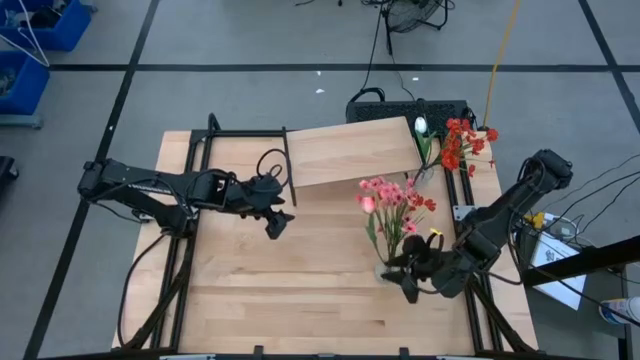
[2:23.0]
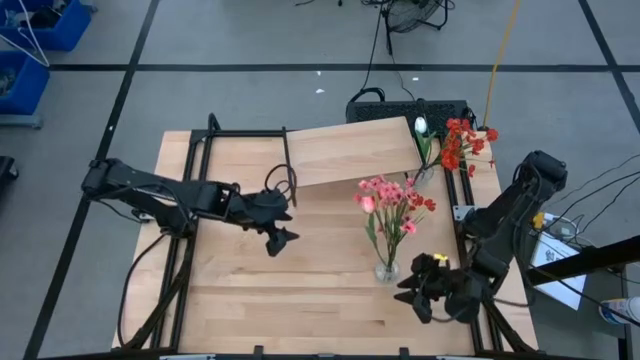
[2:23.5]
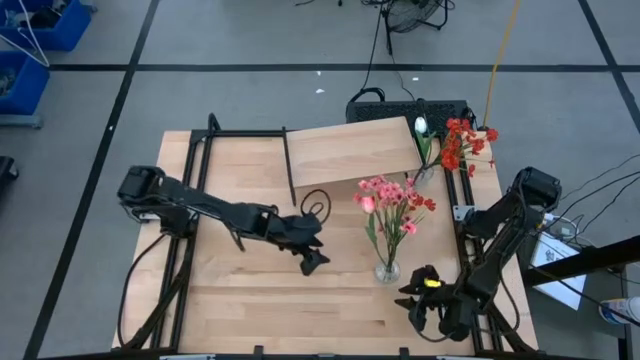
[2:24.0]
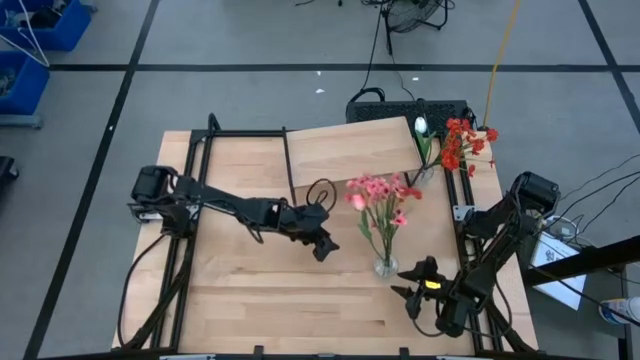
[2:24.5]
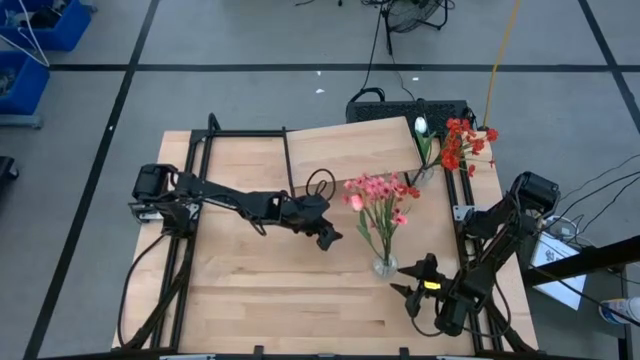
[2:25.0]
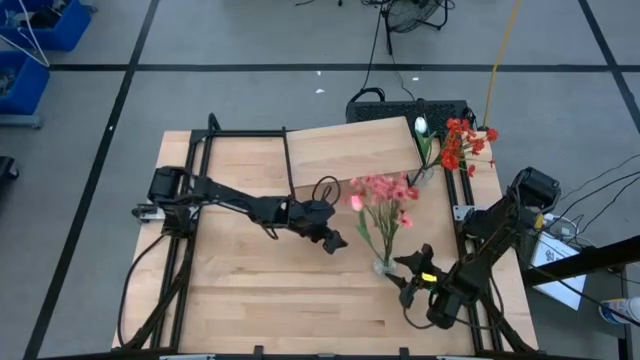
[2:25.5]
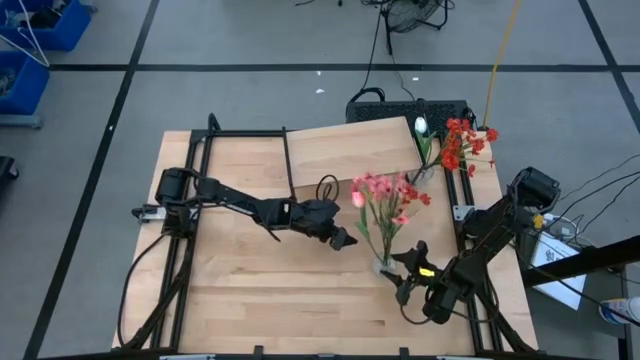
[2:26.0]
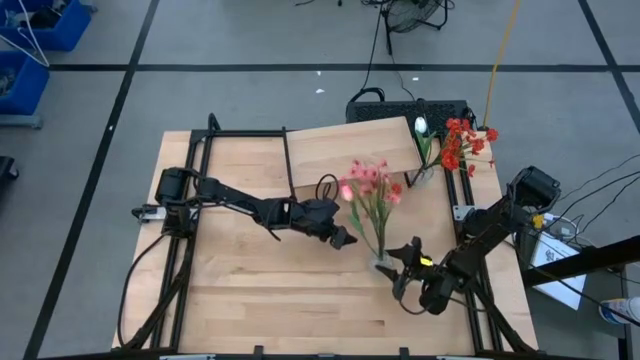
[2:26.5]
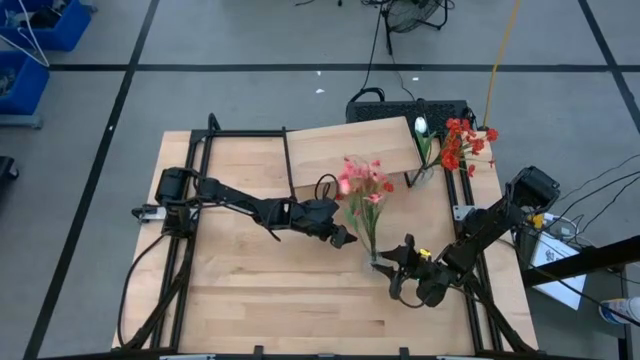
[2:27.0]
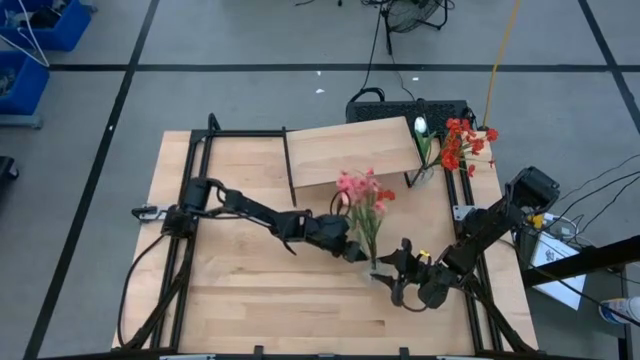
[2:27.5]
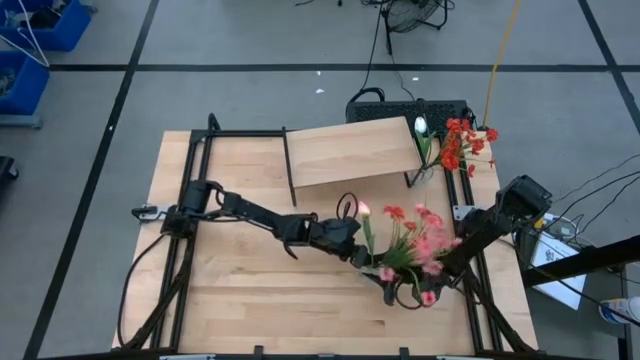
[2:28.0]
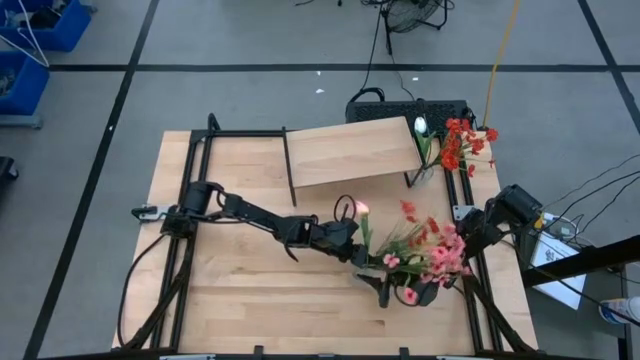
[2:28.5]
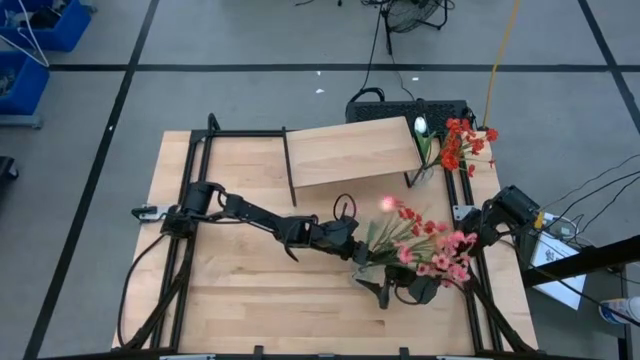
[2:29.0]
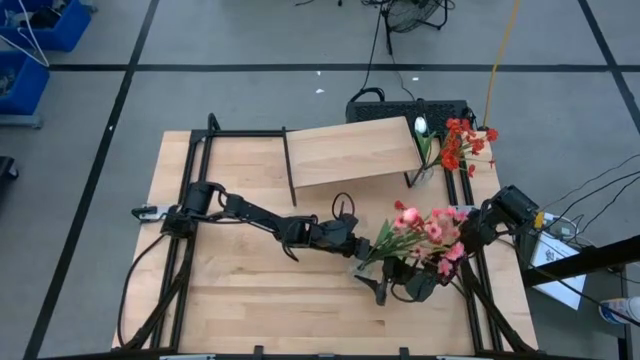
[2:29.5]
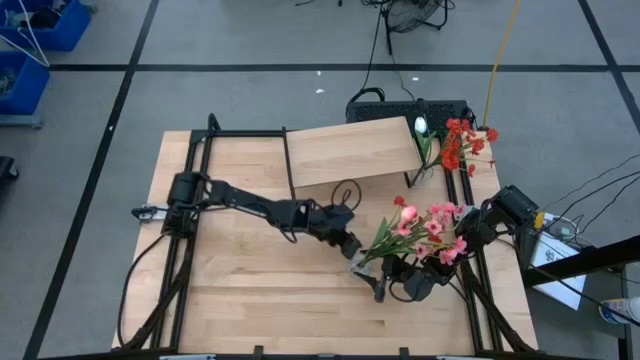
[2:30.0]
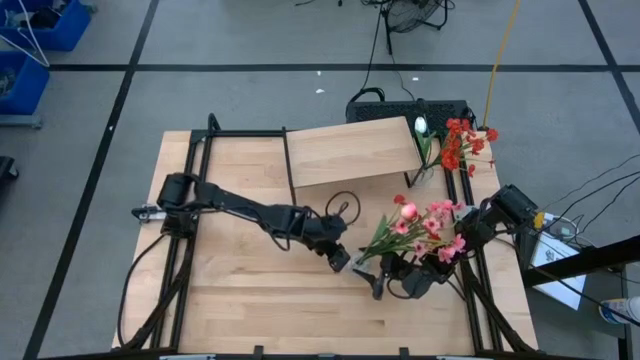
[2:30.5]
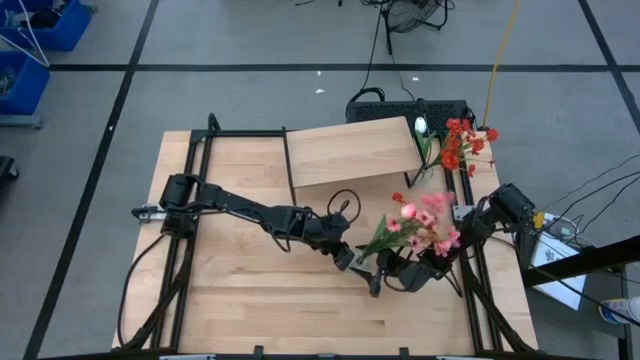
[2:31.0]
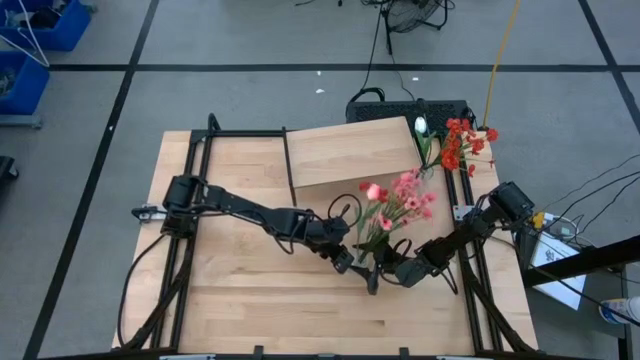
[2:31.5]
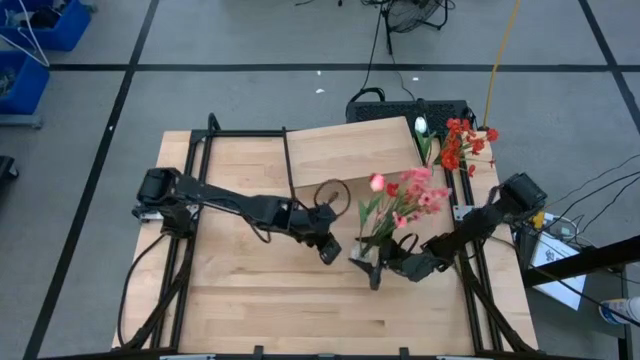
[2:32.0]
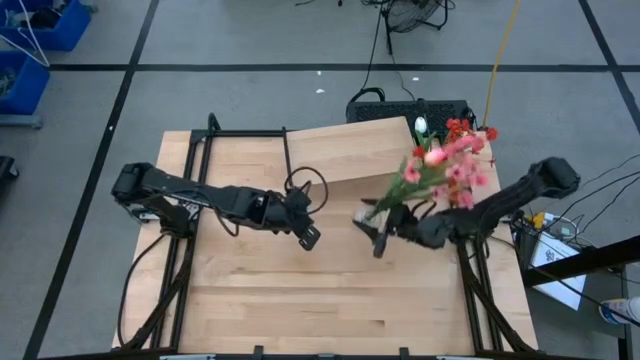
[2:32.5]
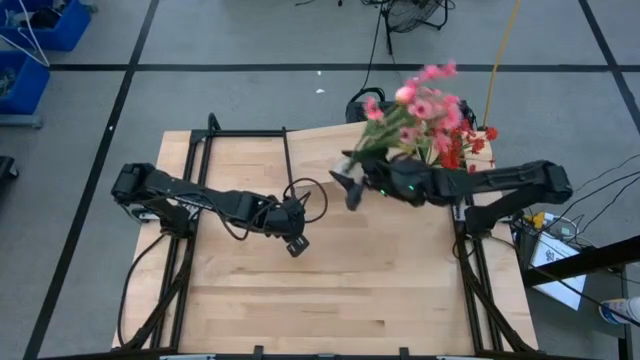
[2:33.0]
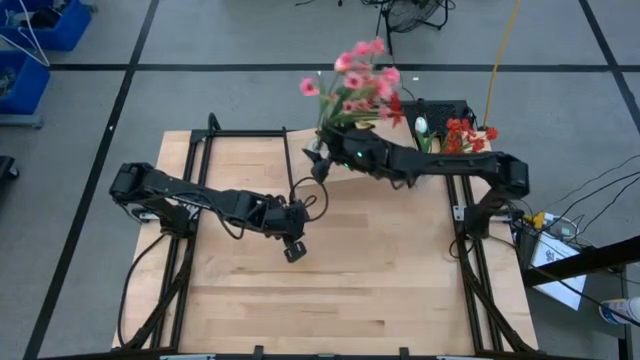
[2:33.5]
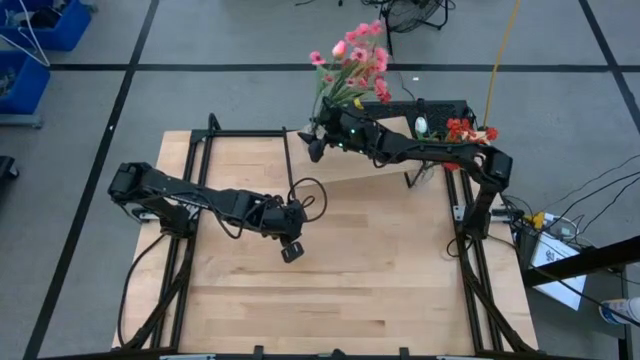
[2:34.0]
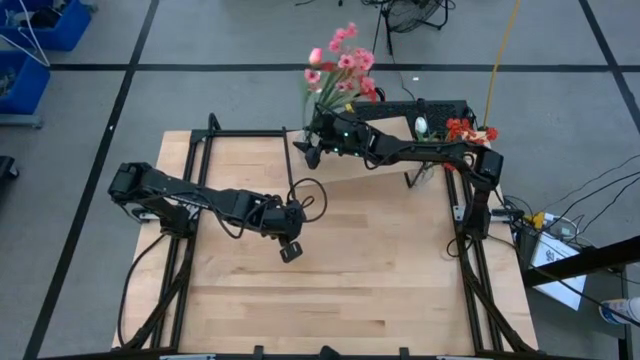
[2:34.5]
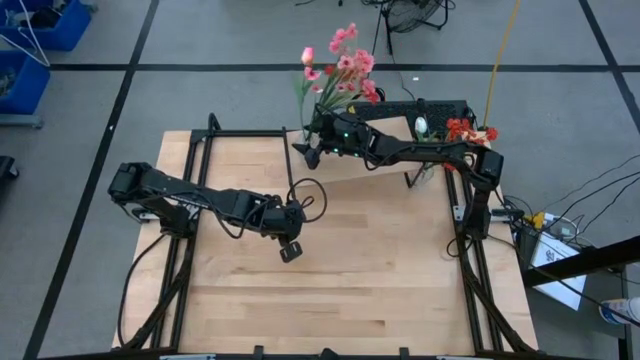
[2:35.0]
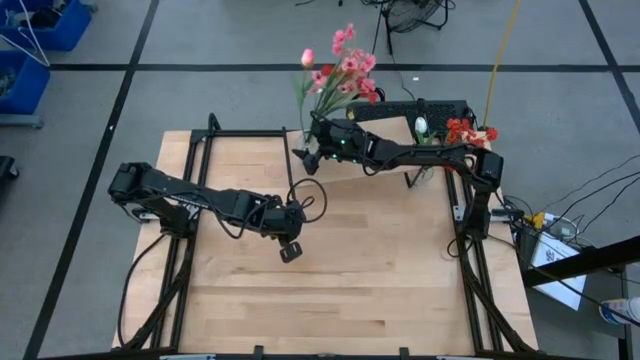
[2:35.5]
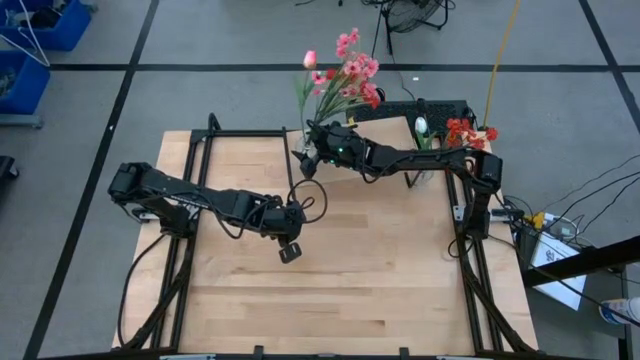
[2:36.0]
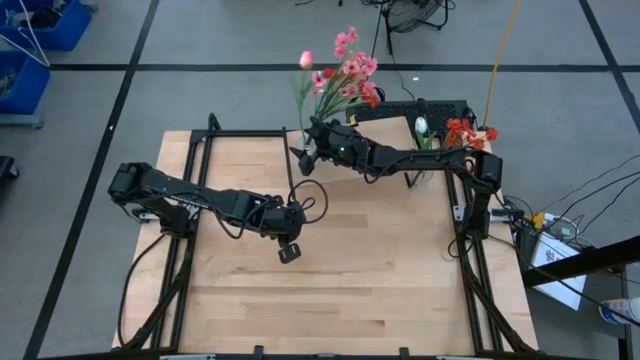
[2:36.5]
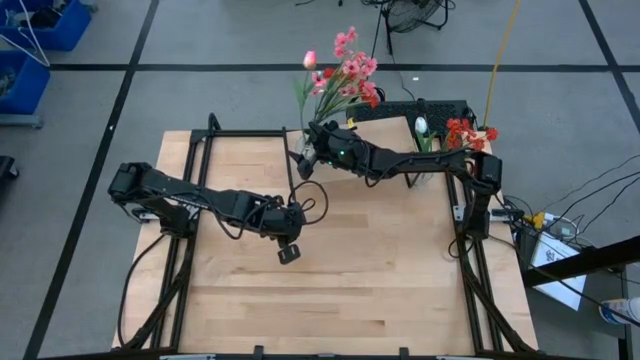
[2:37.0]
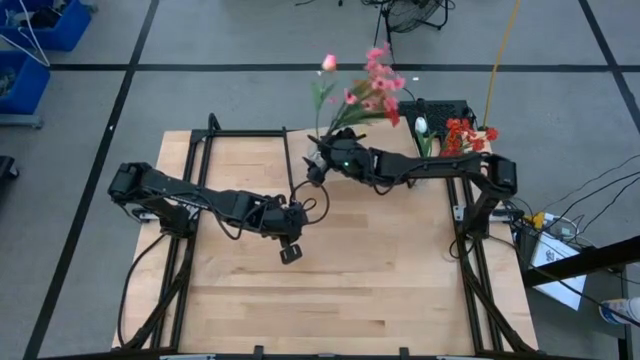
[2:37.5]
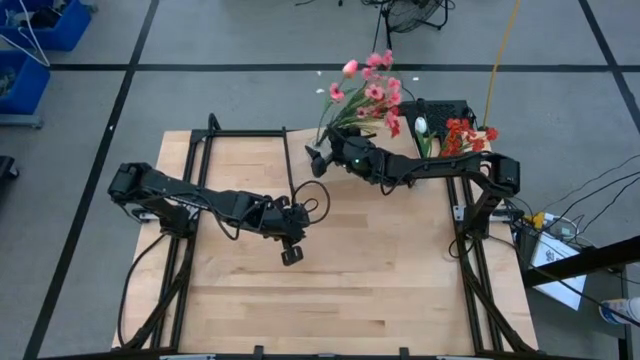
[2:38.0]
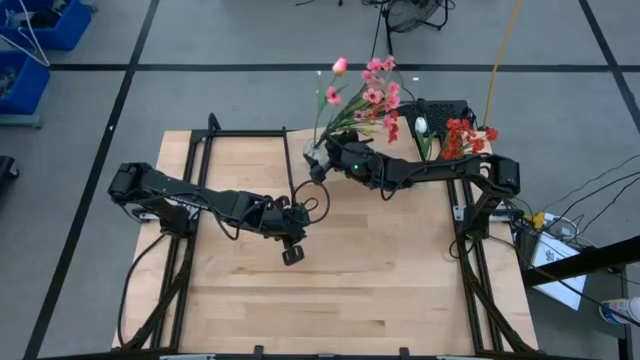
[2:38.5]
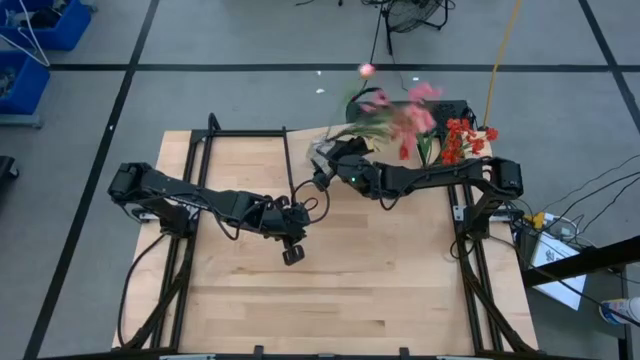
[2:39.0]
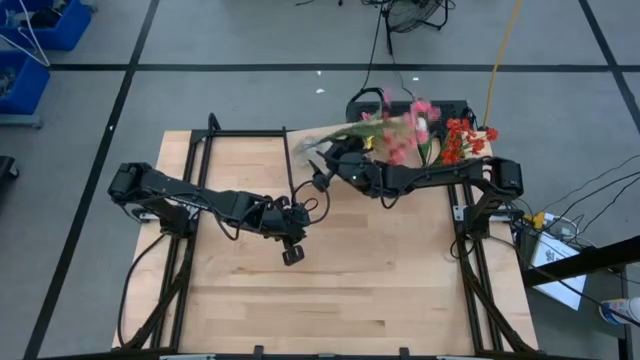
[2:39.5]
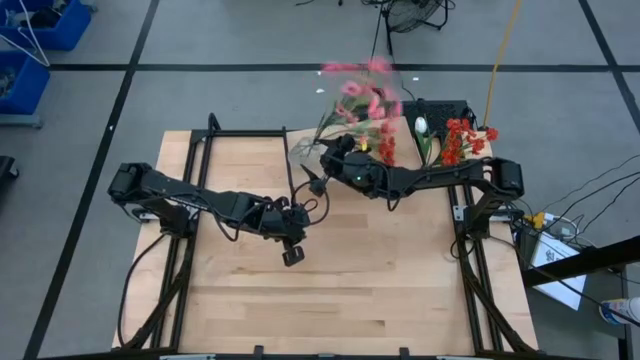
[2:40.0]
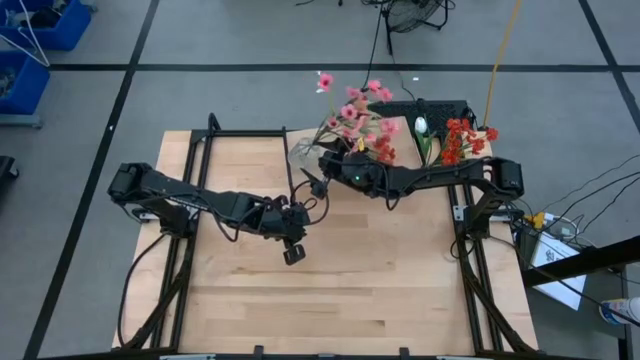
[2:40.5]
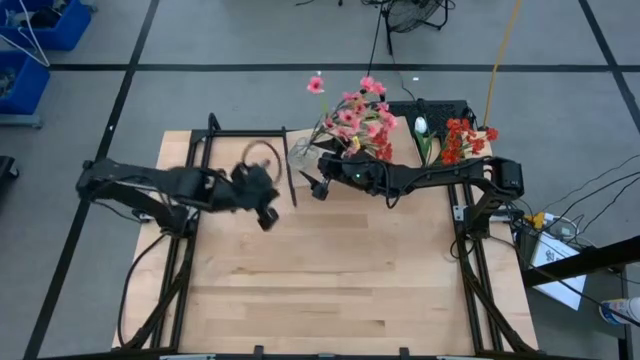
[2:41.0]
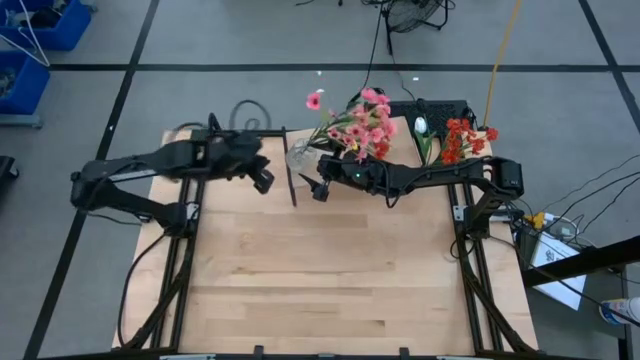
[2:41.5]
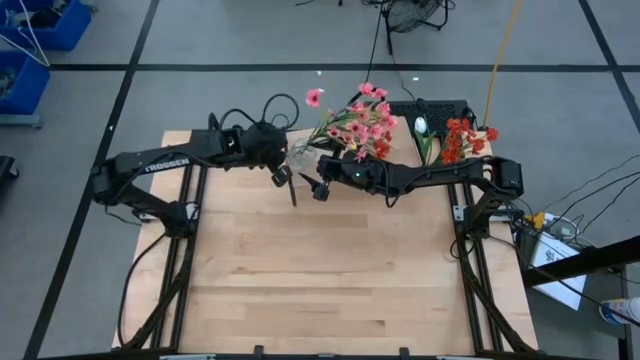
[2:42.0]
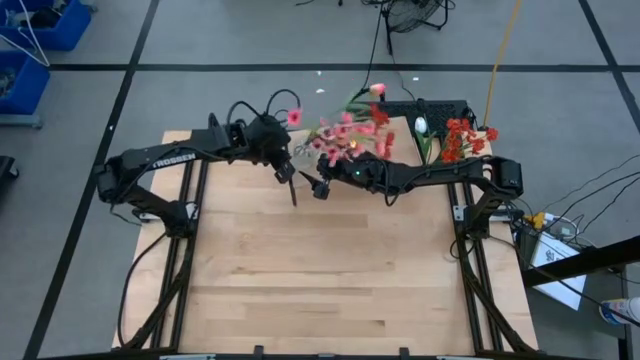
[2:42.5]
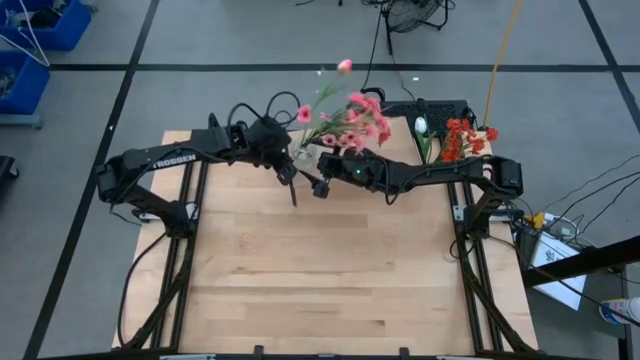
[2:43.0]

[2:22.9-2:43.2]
Task: Pick and place flowers into a vace then onto a shelf
Put the bottom transparent vase with flowers on the shelf
